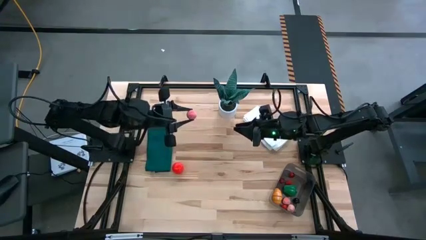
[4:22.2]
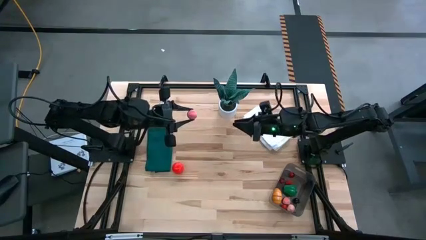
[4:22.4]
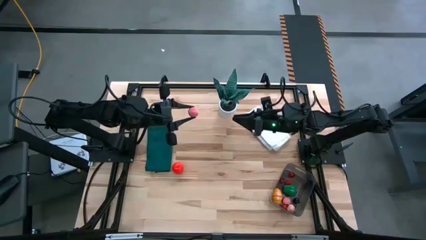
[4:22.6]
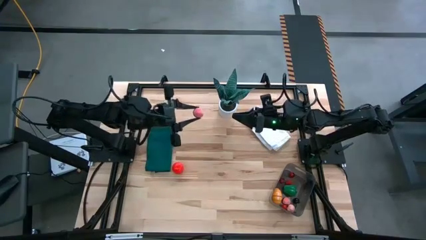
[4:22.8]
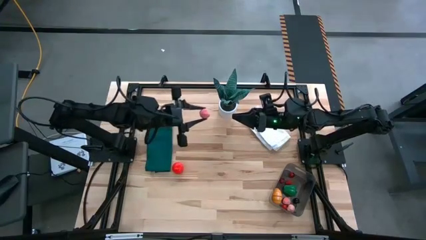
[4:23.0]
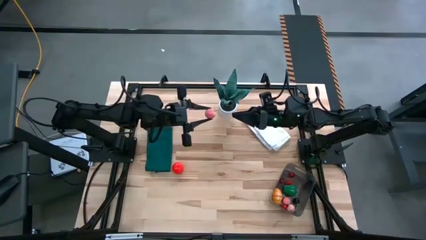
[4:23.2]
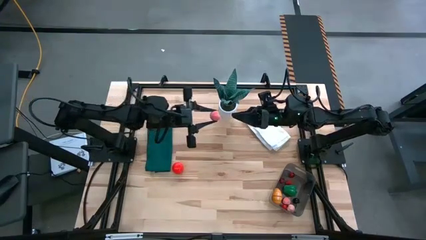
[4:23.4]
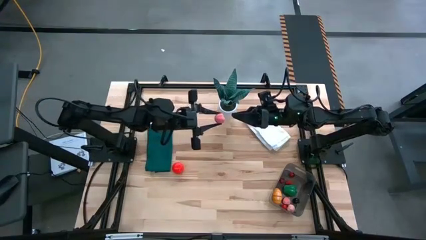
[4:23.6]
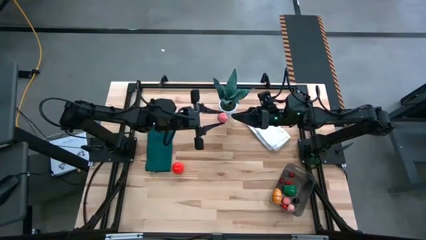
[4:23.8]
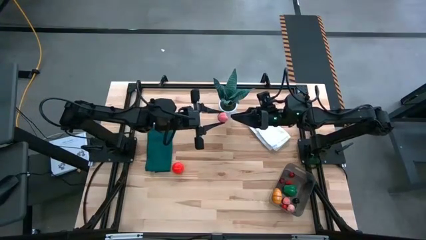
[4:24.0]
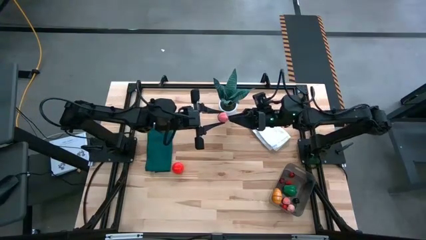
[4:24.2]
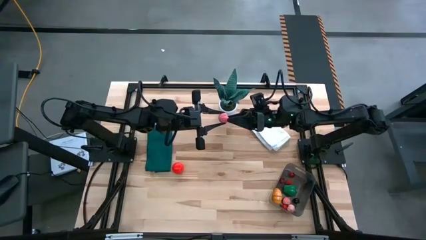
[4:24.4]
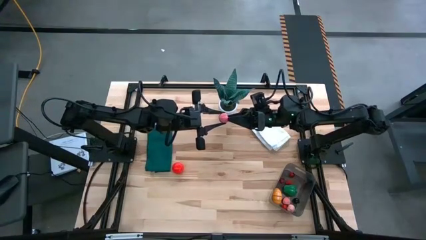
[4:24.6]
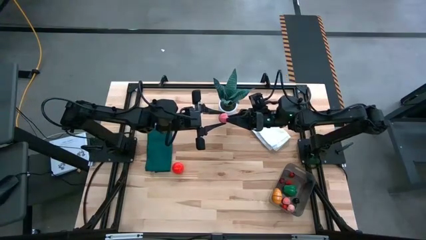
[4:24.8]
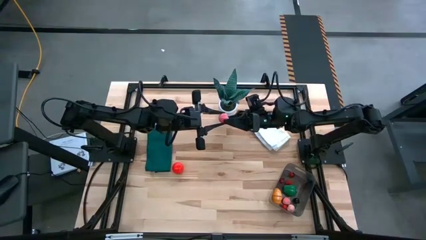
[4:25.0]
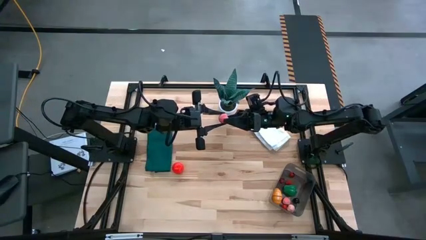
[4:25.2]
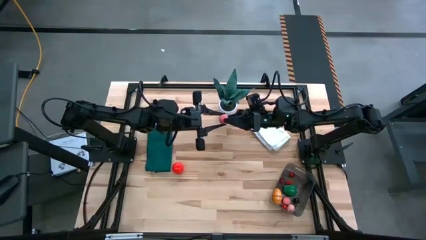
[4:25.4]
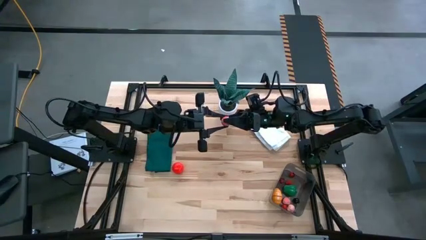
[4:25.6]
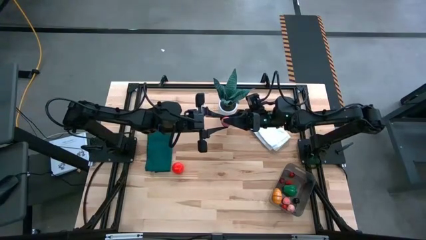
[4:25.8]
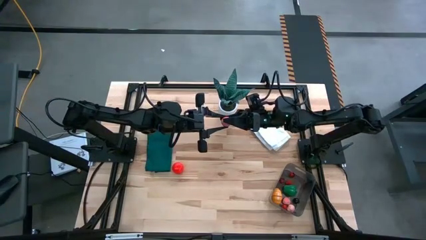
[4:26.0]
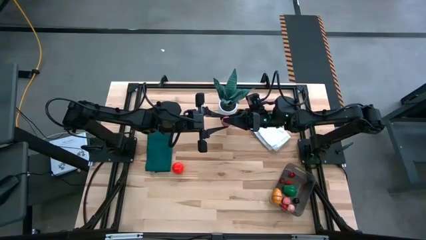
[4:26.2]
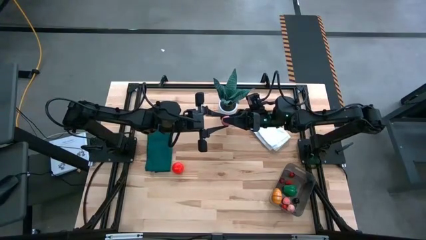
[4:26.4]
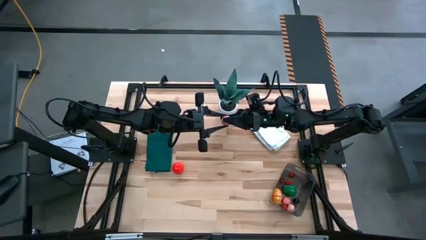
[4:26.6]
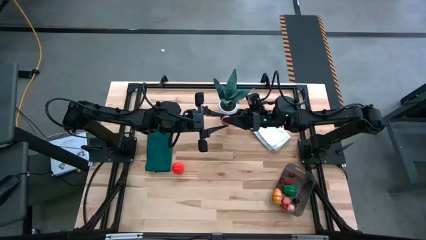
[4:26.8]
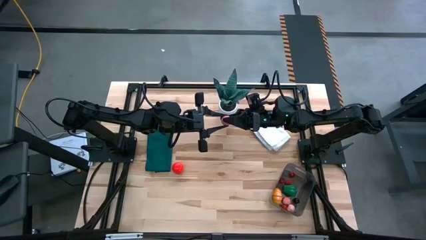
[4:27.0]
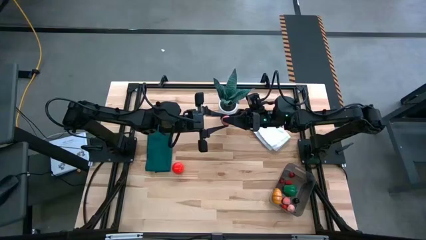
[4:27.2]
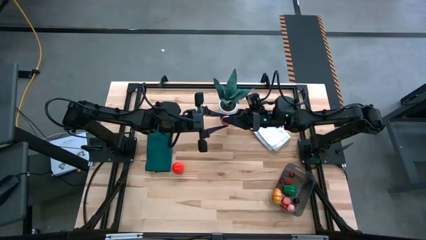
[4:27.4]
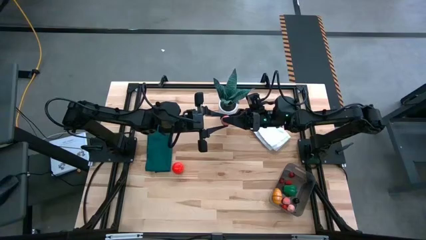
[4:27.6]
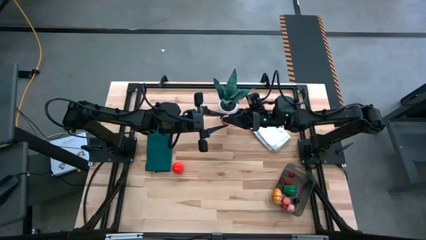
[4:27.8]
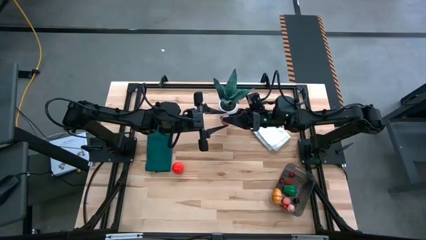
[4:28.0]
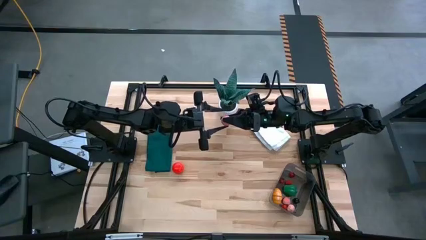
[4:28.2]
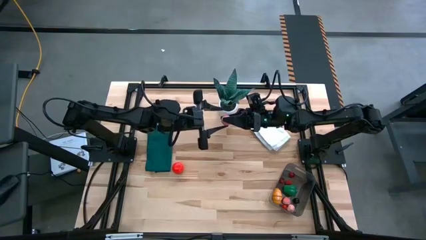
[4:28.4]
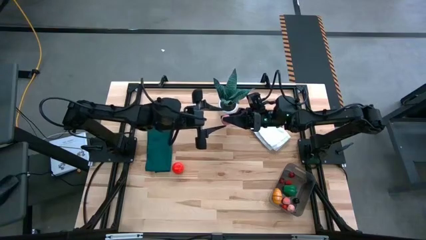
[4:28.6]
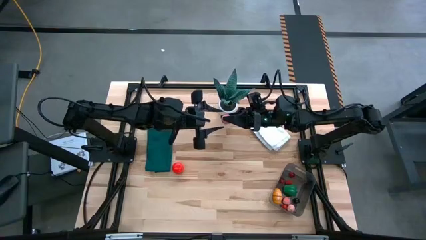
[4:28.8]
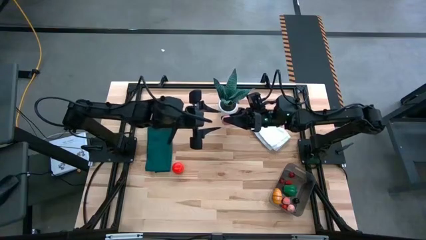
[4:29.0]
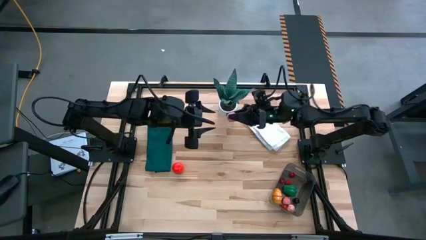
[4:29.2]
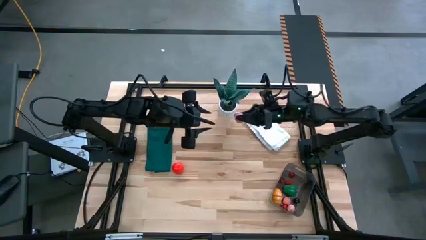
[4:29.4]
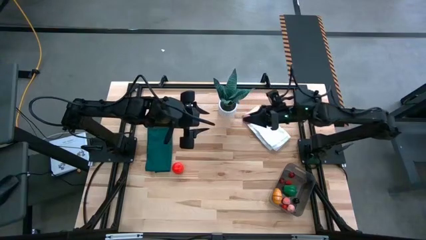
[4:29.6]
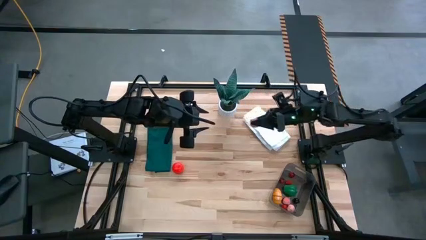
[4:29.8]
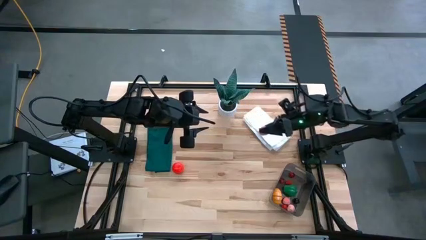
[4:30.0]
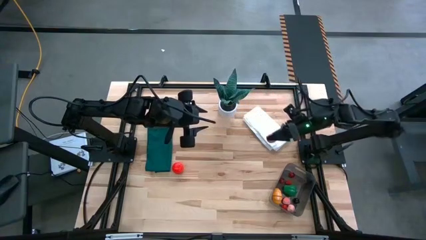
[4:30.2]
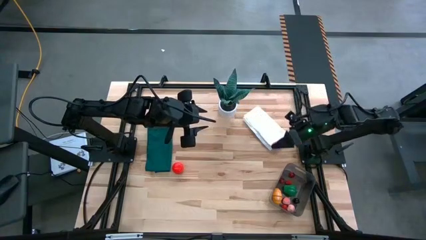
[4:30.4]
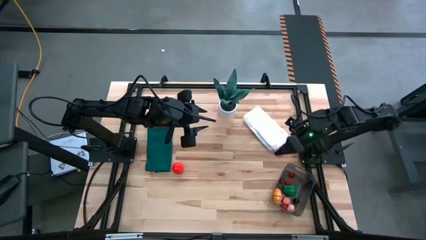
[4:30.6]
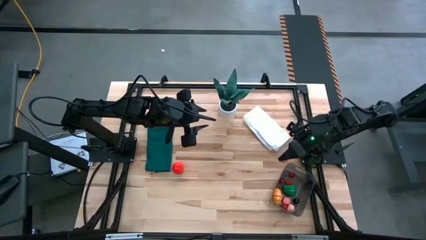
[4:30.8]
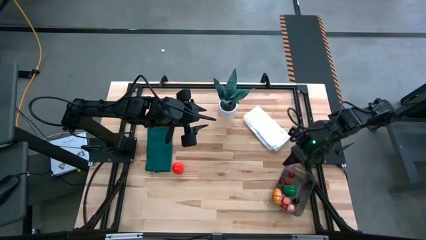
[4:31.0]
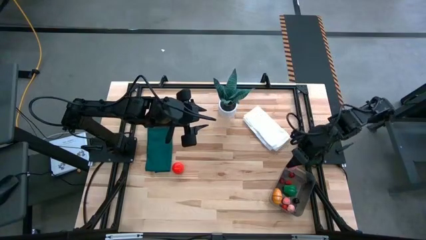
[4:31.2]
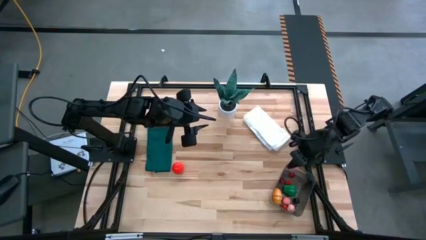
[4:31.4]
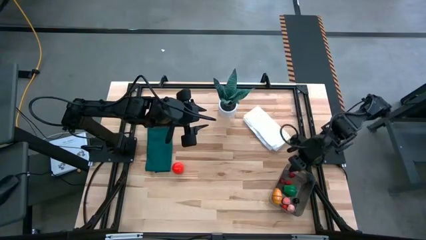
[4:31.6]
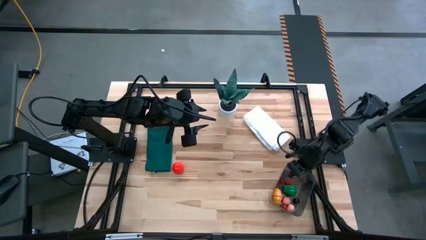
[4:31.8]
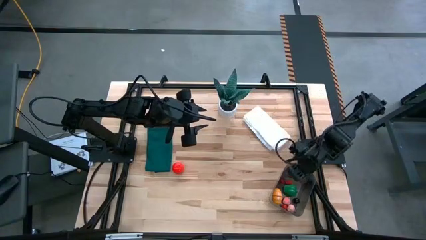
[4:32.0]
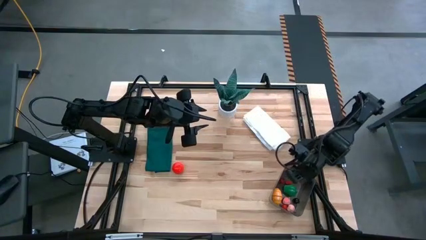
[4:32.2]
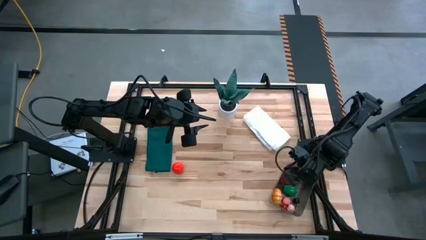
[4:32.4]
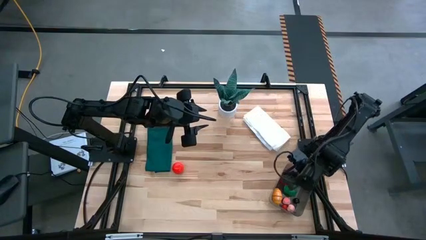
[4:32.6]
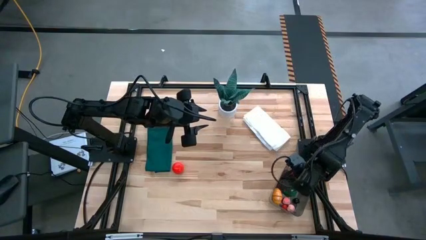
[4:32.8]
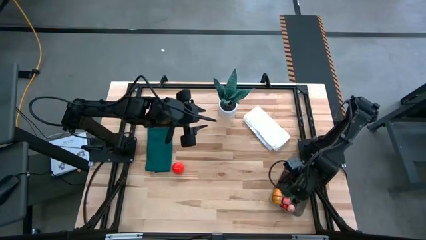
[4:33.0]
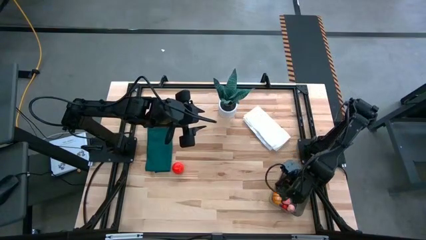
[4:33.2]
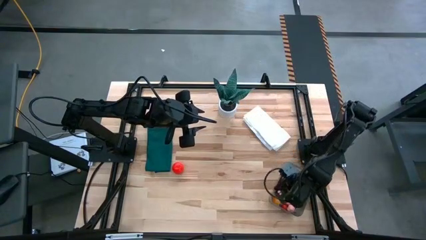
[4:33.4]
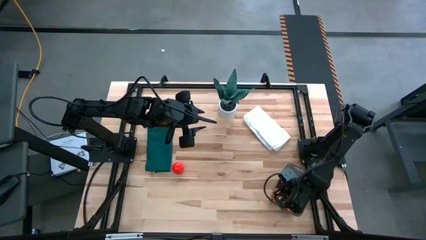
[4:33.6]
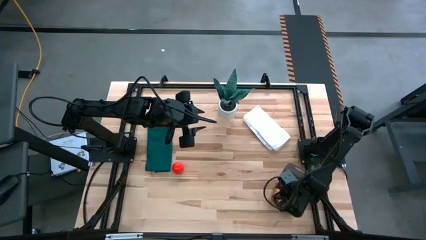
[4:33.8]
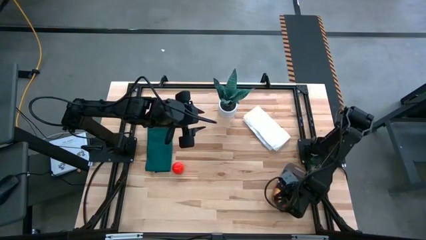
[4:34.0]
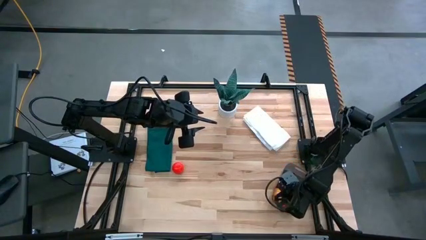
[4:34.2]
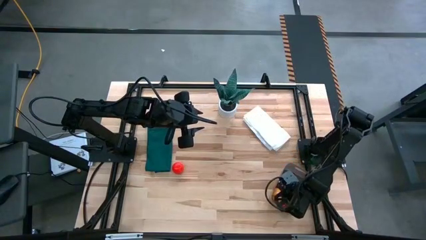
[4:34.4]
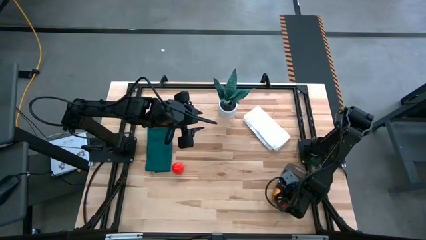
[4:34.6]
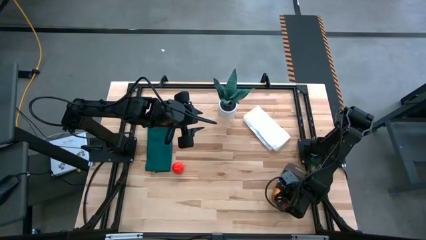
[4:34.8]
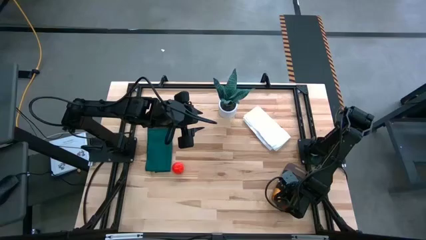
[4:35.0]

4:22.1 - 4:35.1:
Task: Pick and placing Produce into tupperware
Put the pink peach into the black bin

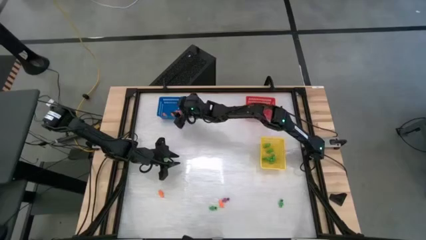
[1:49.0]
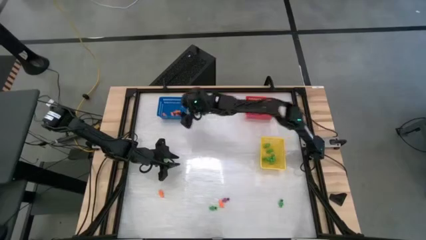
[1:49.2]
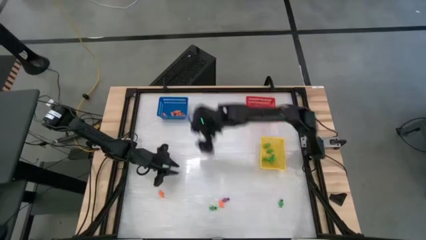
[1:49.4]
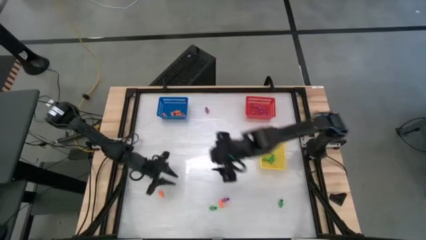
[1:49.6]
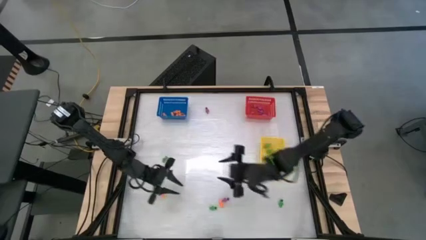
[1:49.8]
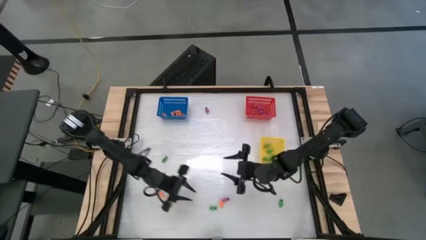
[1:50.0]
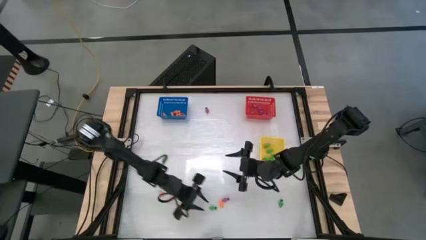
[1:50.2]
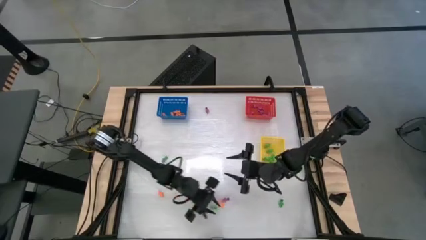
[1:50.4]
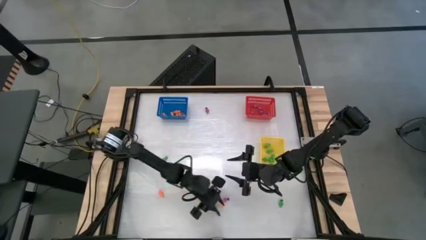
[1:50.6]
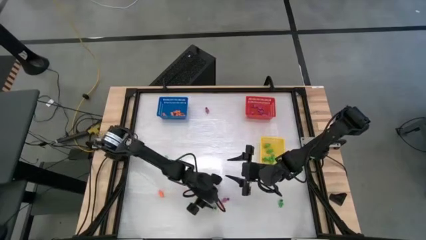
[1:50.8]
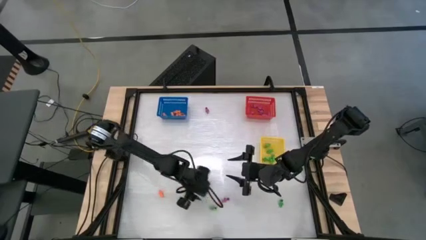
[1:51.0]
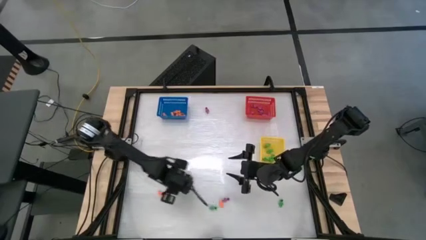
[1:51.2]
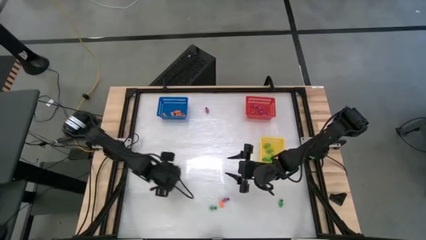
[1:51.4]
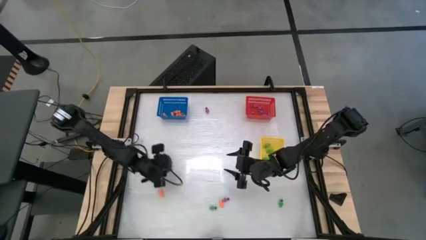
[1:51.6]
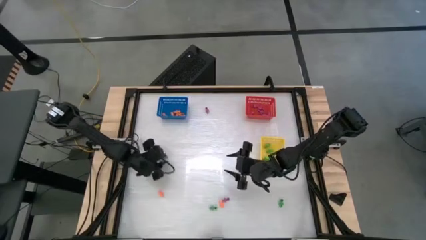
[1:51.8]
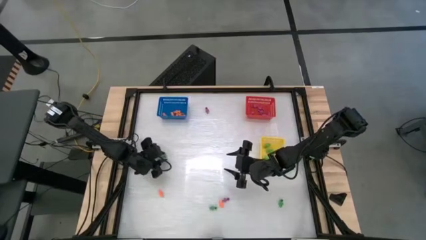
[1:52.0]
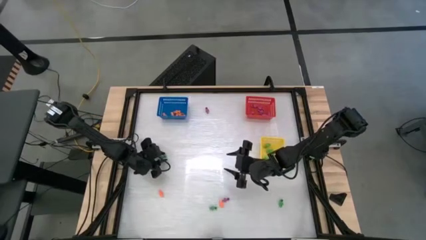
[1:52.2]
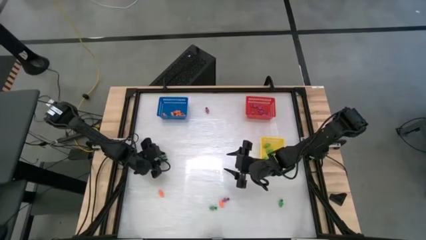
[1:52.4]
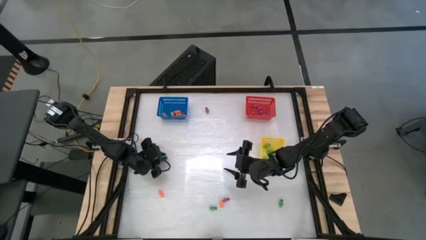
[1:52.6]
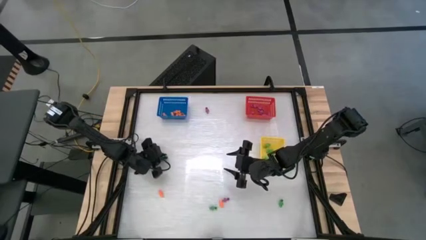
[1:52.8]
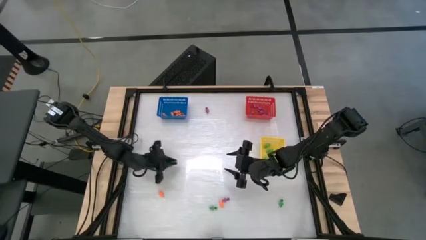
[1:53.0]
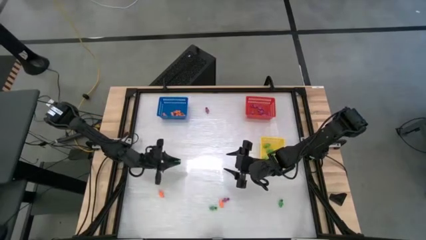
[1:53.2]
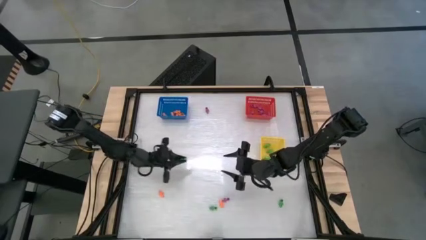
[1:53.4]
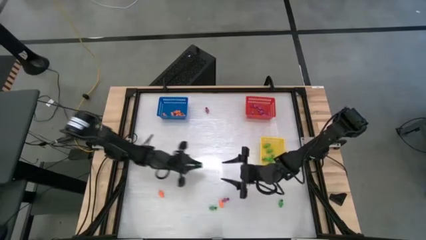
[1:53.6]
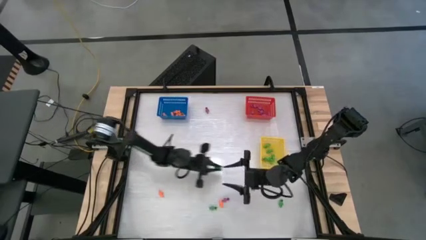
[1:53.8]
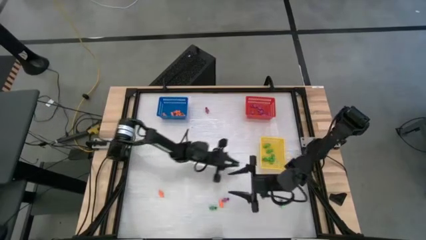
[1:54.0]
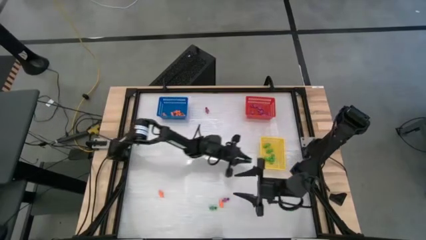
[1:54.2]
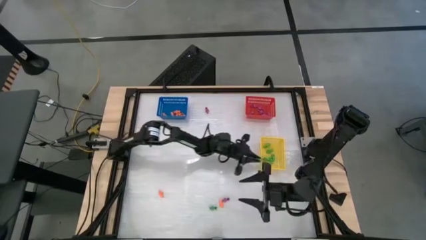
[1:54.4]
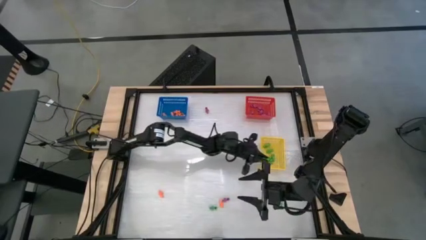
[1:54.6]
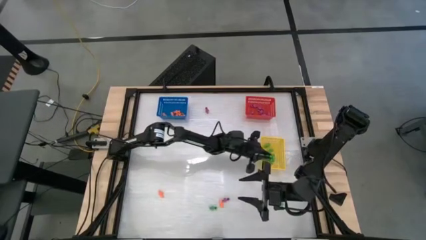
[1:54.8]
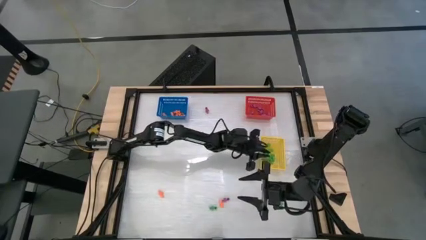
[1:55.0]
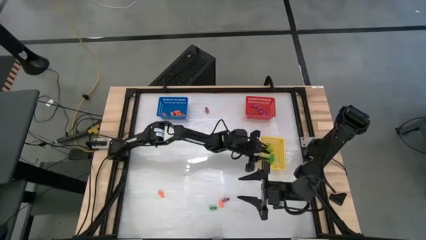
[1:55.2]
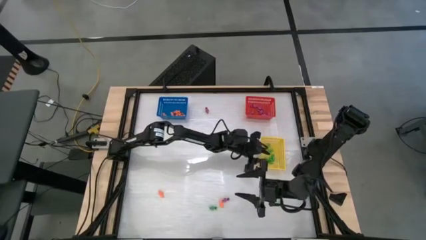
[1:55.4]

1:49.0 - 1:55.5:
Task: Sort Halloween decoration
Put the green skeleton toy into the red bin
